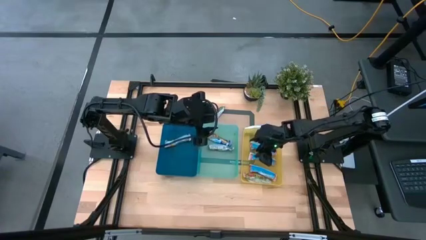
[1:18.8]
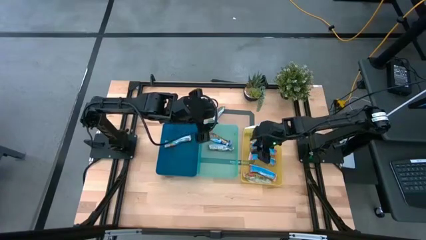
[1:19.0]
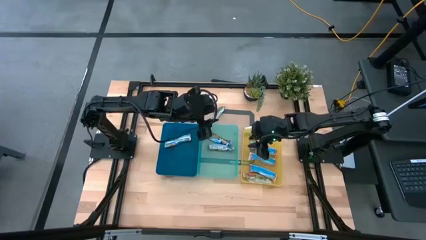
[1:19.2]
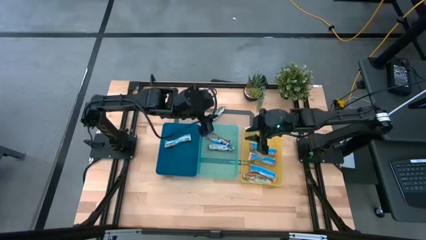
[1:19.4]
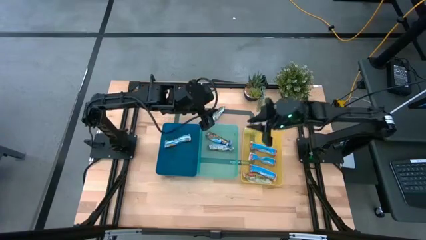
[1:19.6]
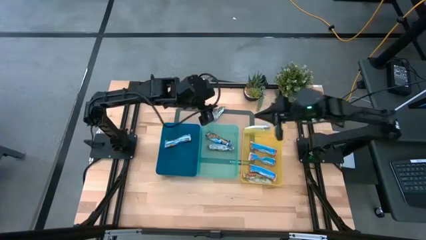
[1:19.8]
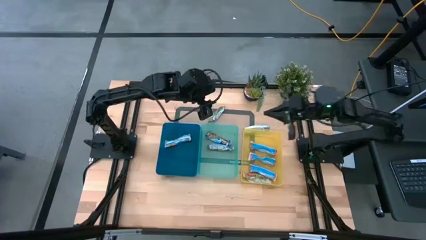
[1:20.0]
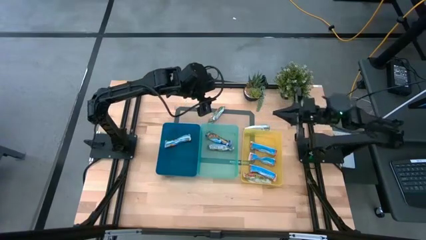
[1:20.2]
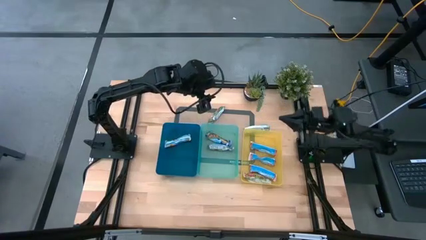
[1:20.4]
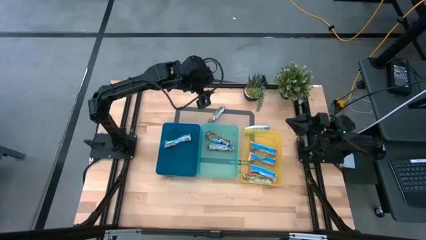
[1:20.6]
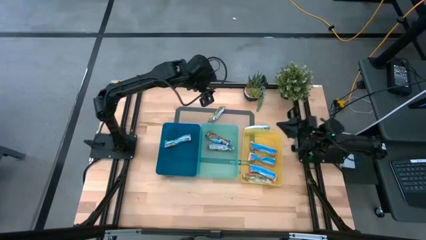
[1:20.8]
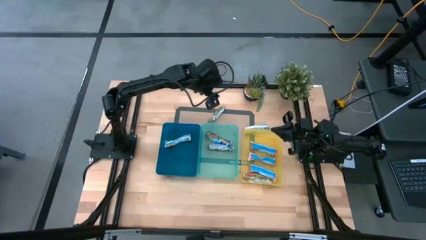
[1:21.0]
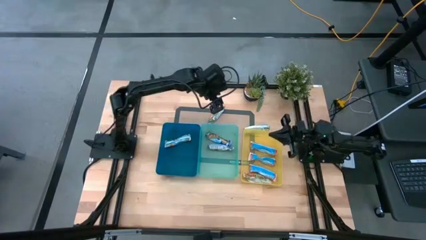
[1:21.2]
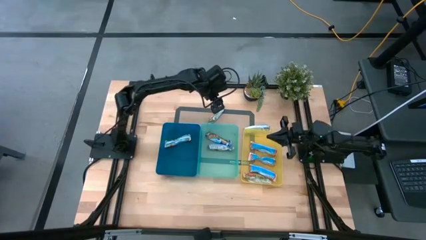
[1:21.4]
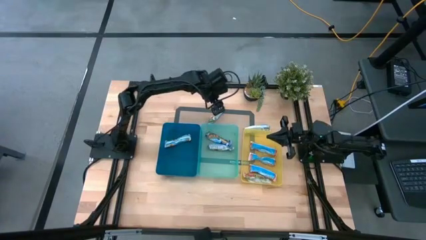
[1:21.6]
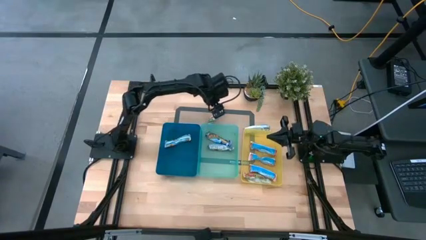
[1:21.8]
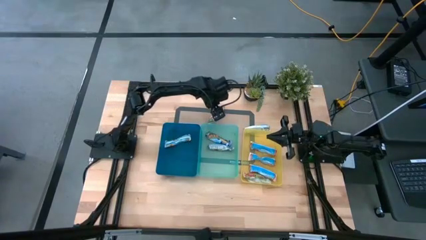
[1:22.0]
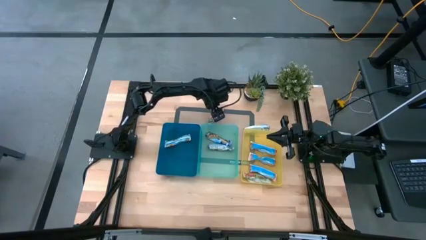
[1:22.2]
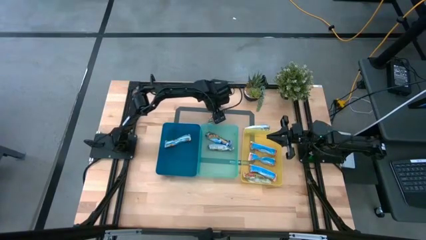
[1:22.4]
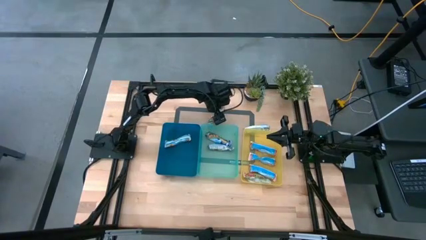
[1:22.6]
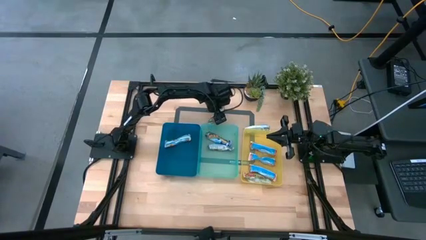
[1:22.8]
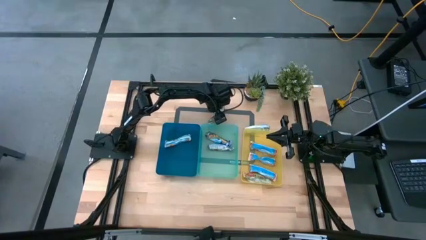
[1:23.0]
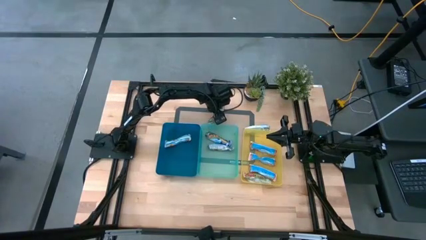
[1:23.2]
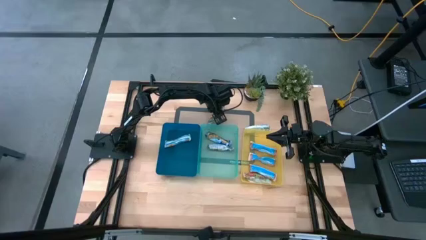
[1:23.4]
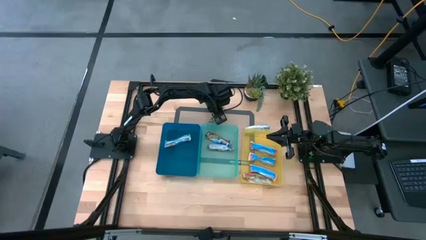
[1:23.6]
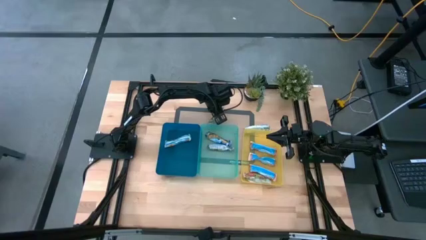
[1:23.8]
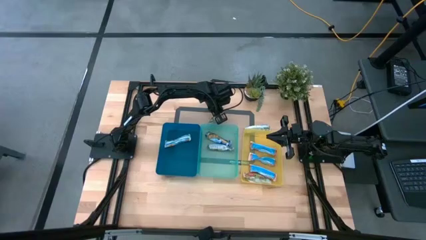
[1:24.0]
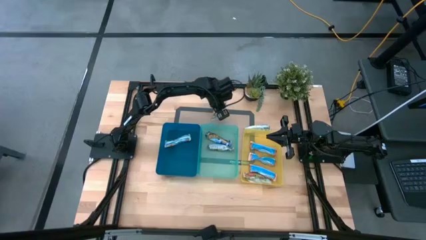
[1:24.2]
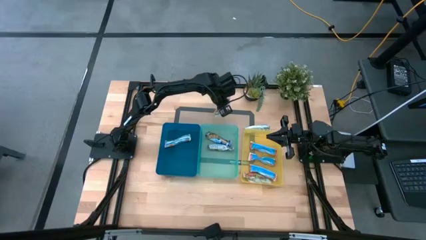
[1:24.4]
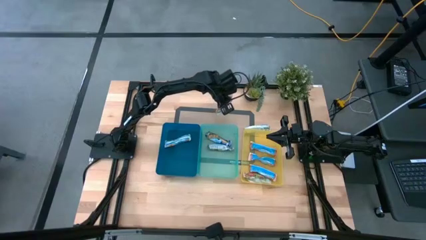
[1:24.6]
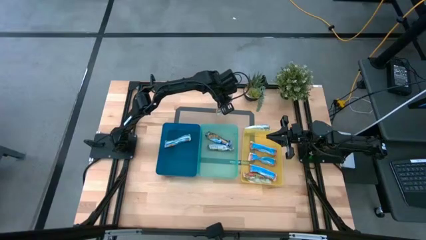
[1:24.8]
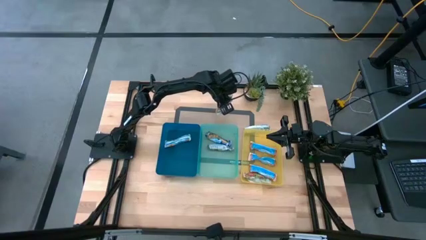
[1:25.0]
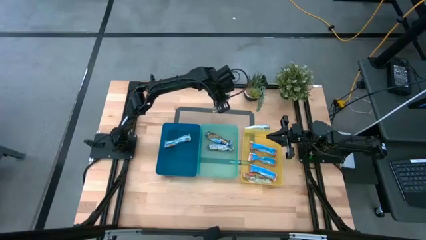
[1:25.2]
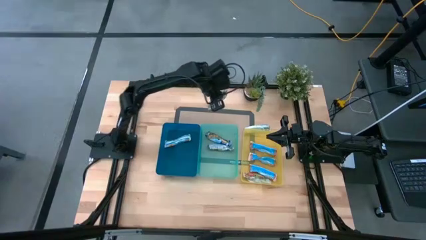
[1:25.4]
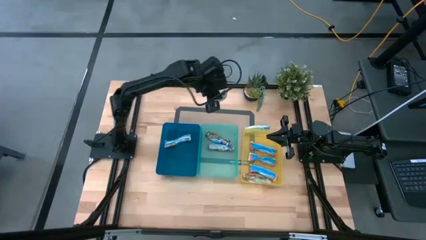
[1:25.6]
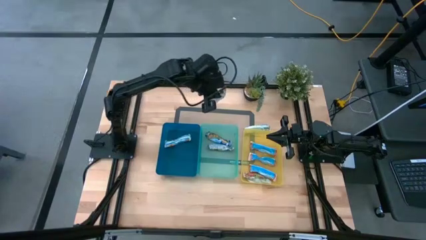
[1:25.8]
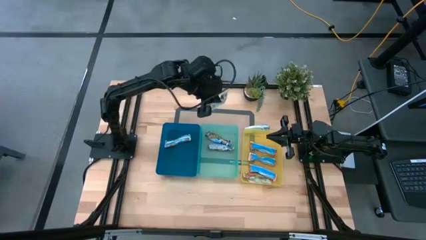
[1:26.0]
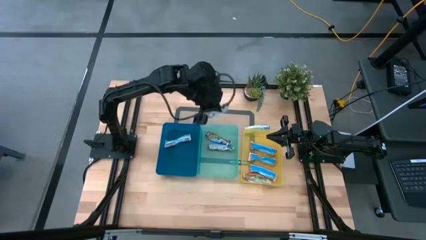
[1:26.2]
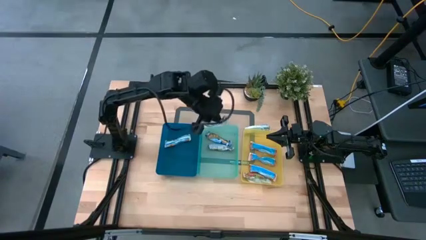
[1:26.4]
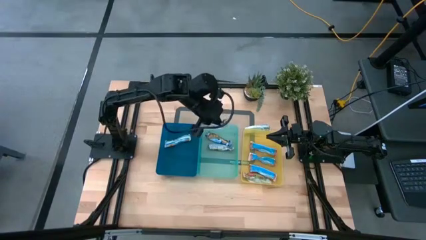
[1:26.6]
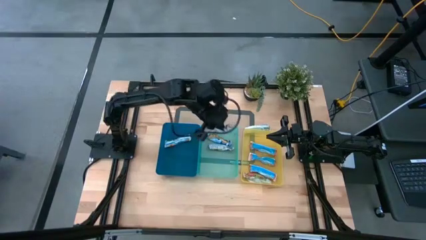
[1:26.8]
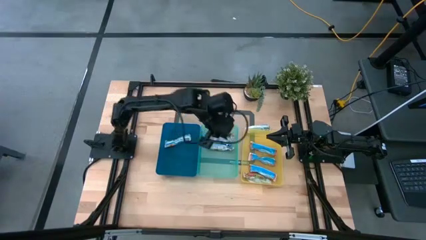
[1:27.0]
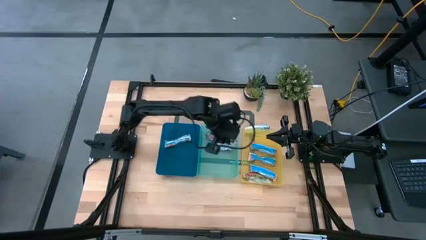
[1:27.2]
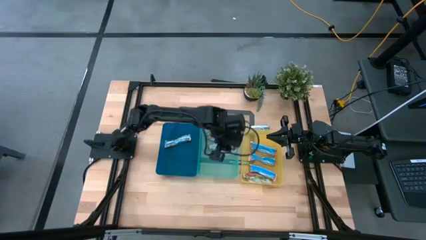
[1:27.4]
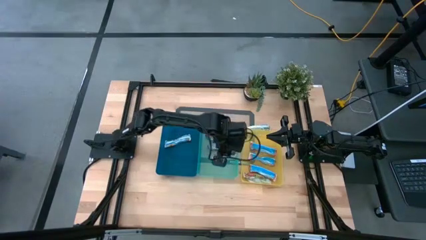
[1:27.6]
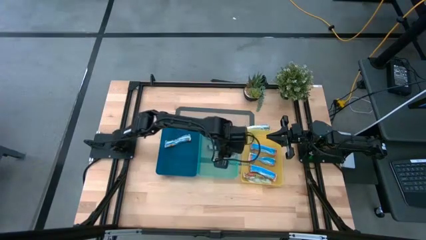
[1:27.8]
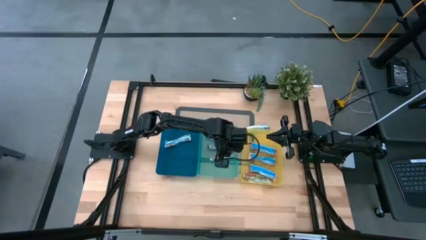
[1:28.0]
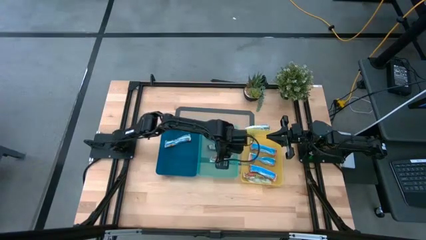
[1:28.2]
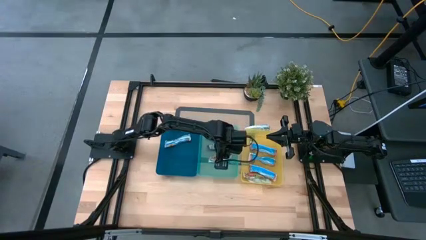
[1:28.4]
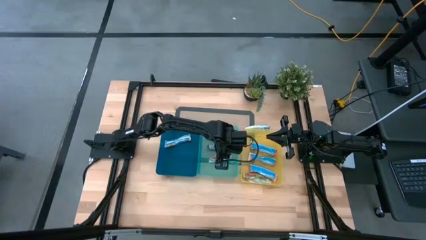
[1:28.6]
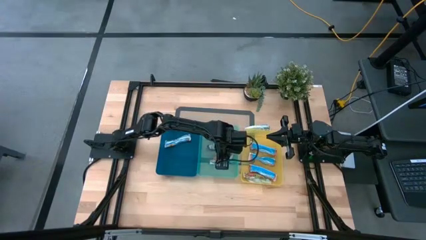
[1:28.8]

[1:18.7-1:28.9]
Task: Pick and place Granola Bars by type
Put the left yellow granola bar into the green bin

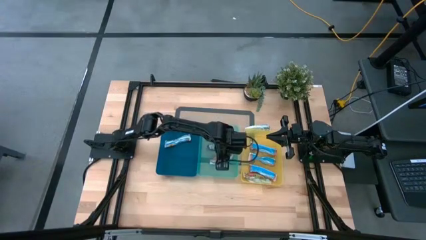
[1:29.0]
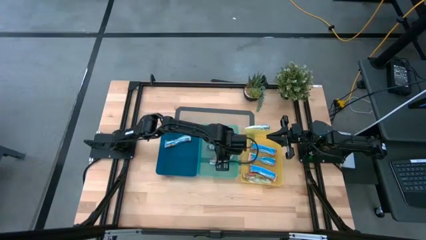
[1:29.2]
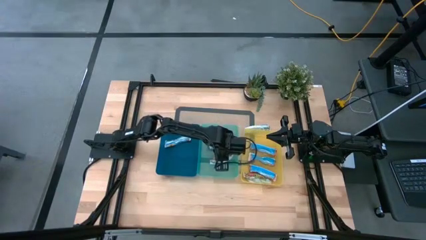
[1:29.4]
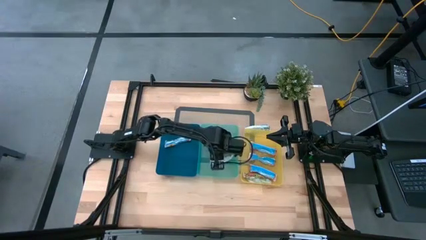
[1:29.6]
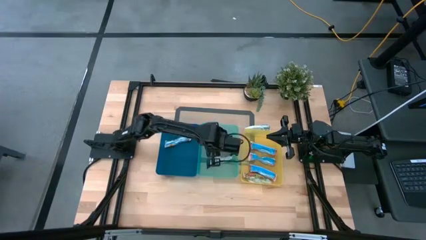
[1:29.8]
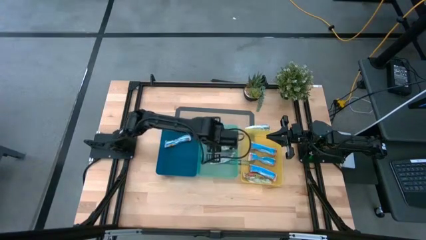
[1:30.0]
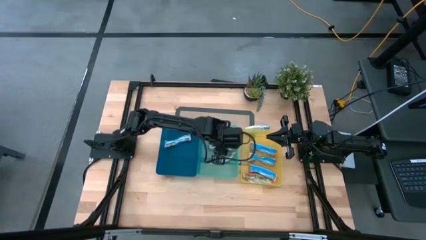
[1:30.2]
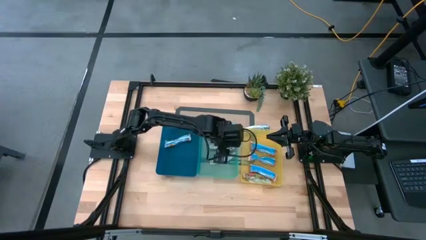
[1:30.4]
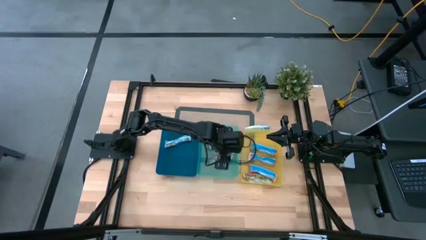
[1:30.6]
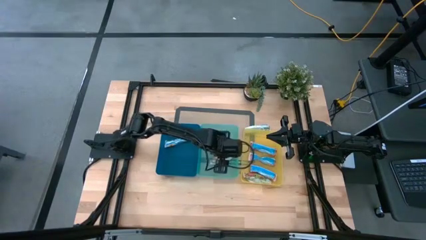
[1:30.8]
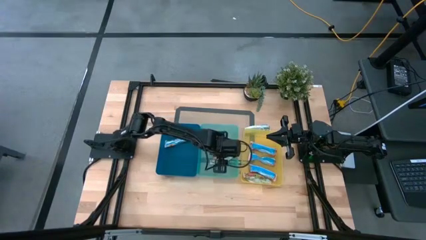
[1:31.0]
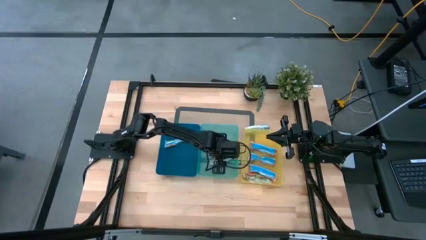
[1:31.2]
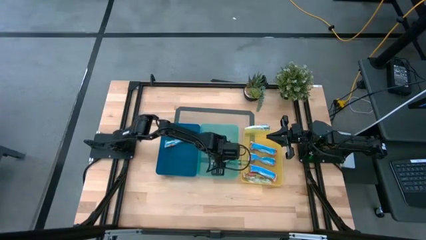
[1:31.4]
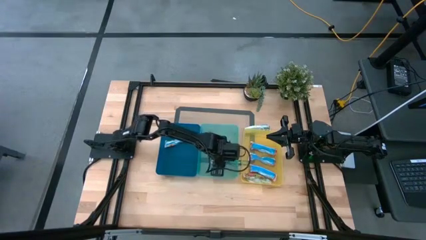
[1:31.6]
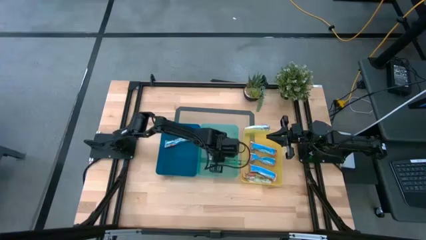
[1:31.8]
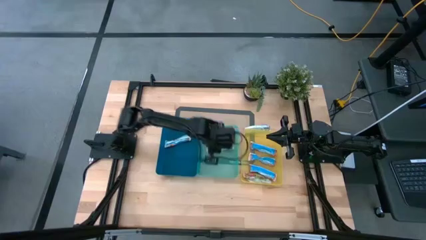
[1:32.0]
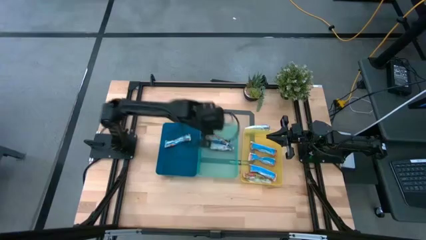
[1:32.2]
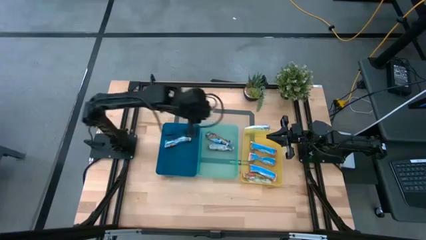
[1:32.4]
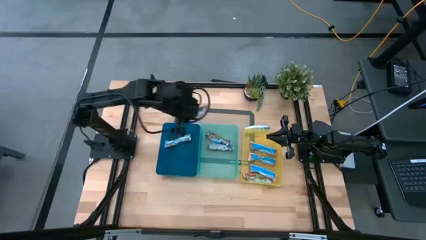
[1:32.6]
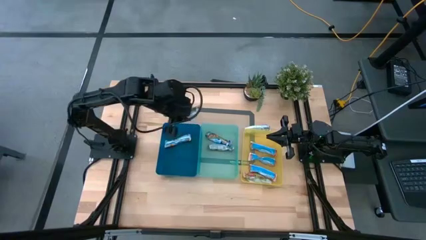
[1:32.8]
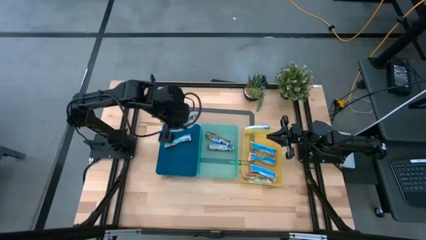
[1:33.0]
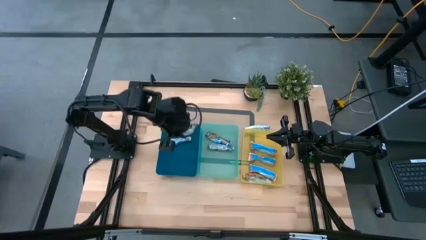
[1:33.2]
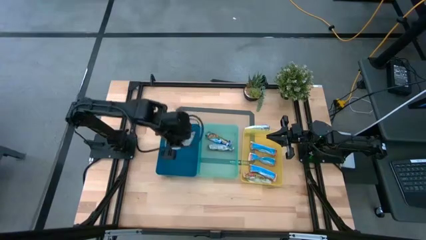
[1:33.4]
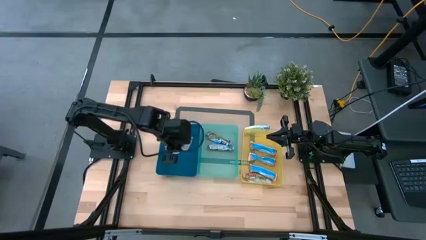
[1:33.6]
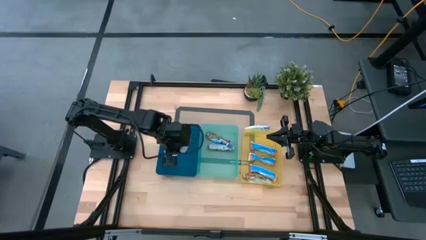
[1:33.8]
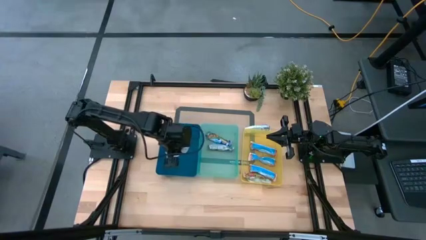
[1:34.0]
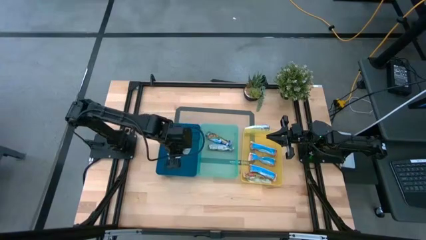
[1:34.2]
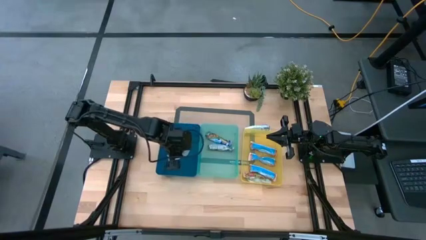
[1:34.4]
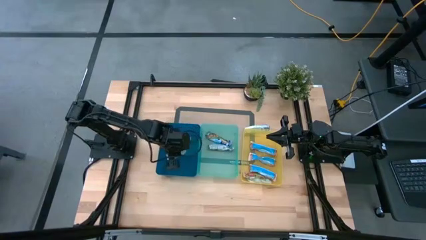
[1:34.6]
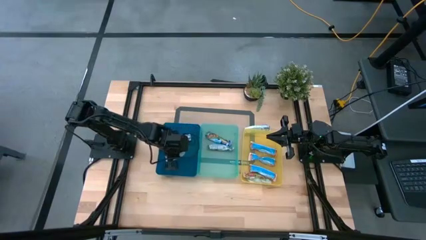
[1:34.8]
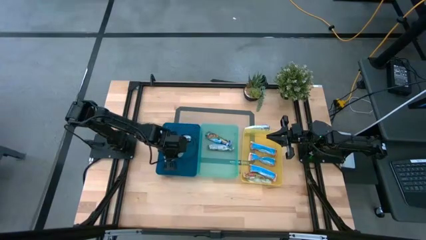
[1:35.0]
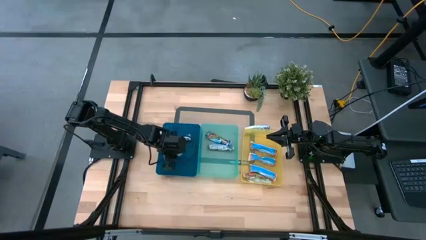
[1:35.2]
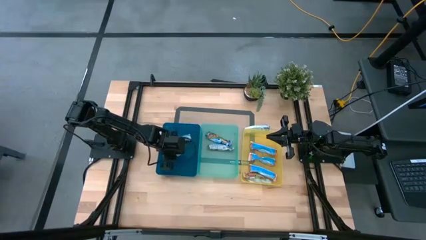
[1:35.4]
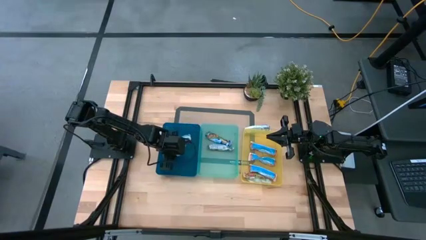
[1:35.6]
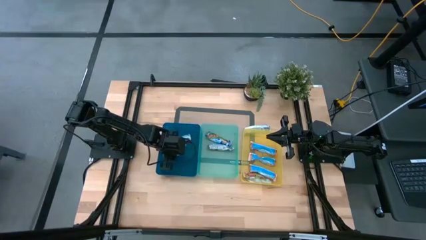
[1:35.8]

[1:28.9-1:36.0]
Put the left yellow granola bar into the blue bin
